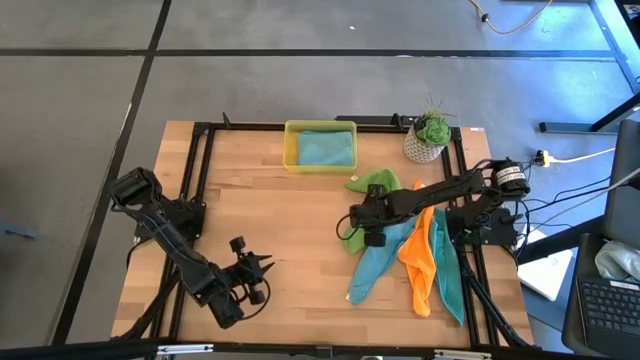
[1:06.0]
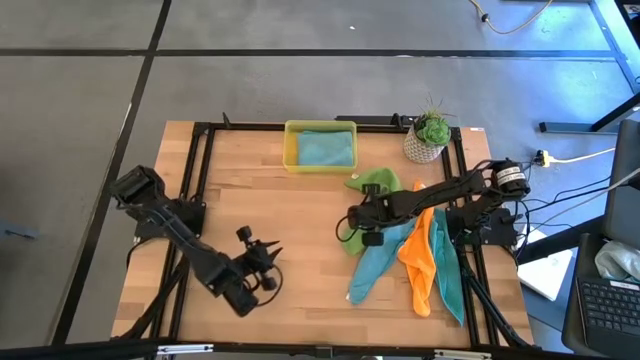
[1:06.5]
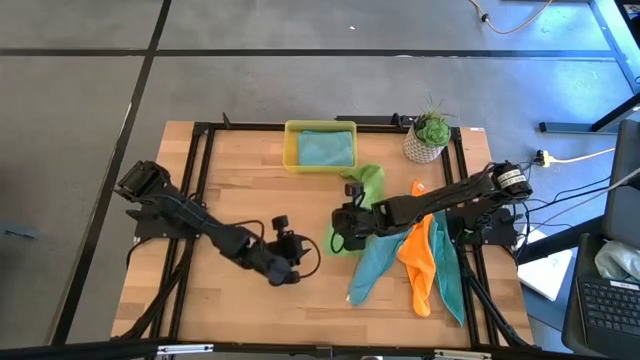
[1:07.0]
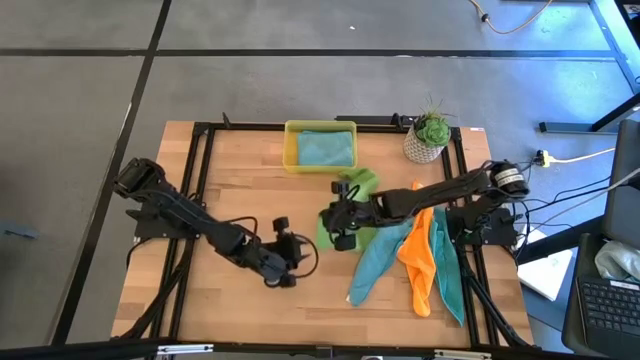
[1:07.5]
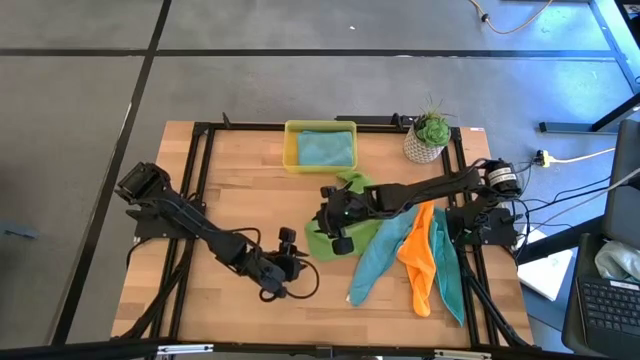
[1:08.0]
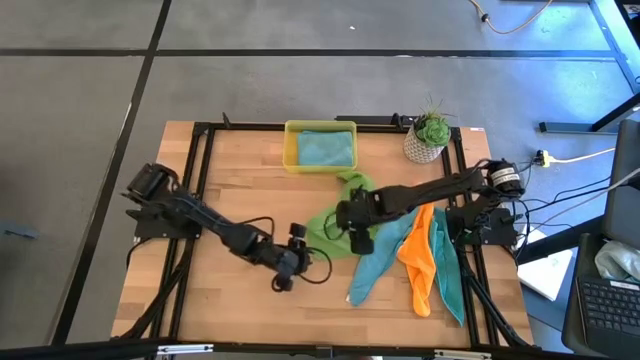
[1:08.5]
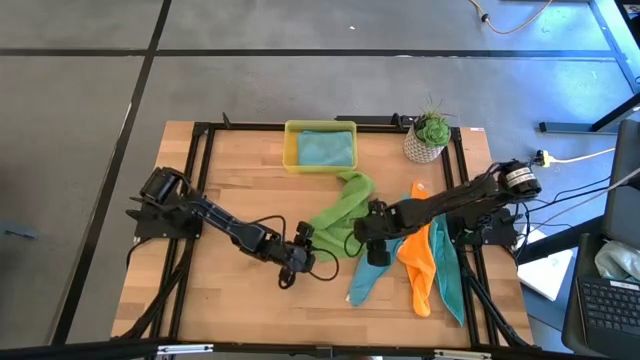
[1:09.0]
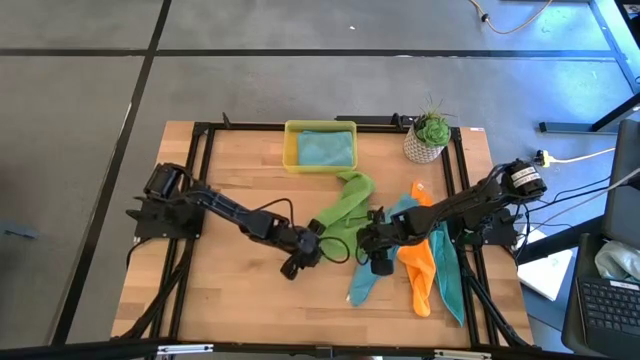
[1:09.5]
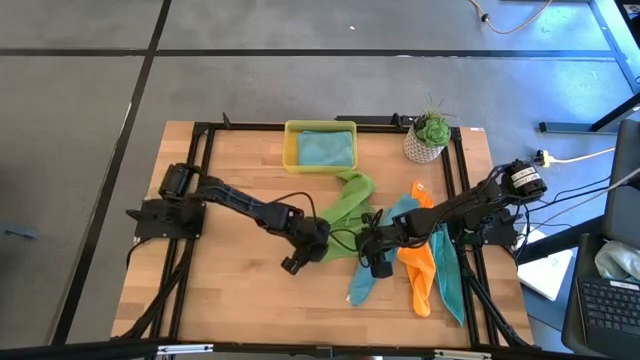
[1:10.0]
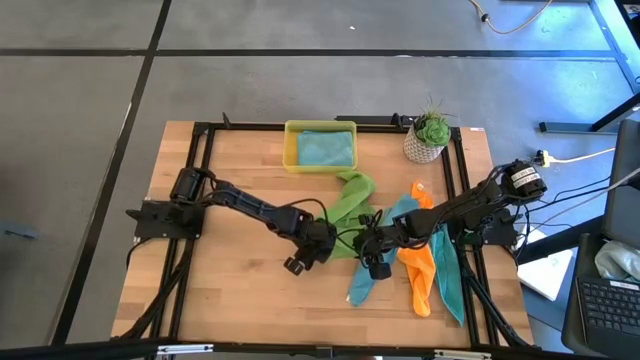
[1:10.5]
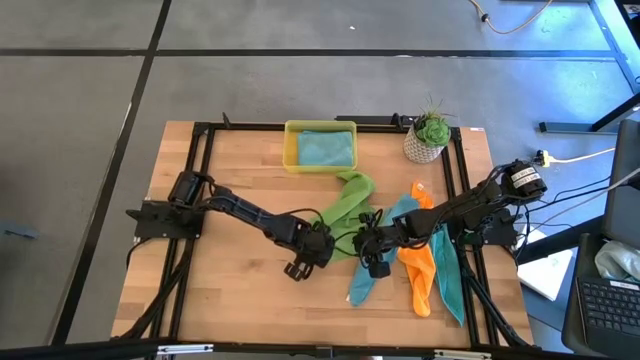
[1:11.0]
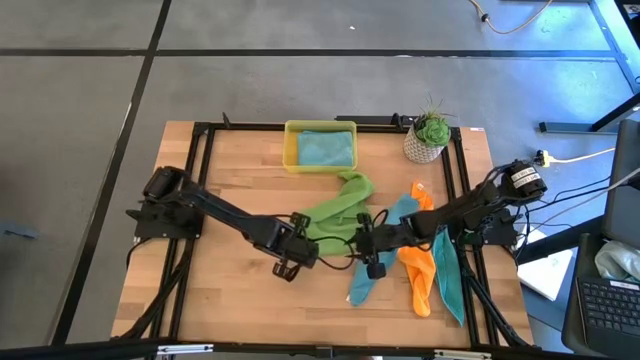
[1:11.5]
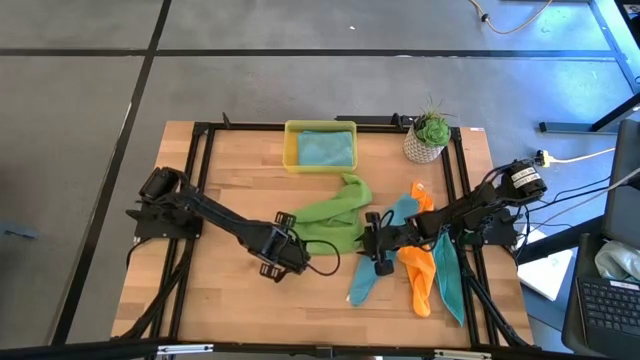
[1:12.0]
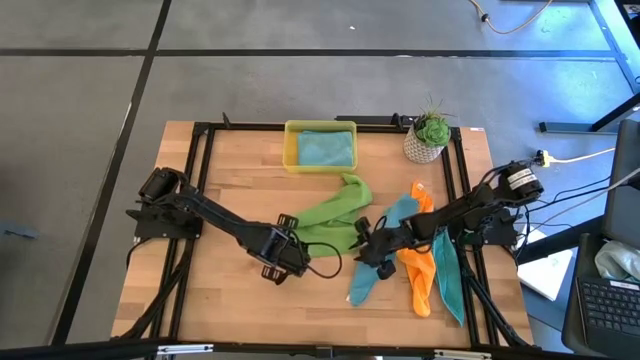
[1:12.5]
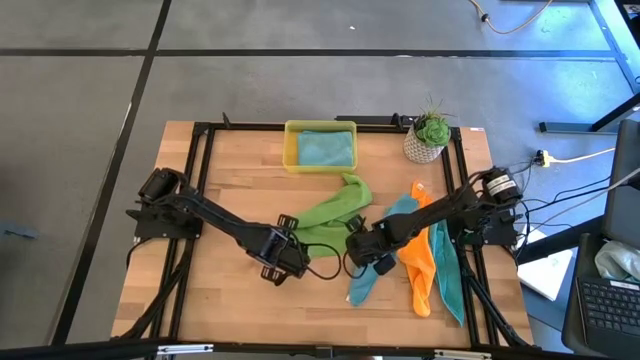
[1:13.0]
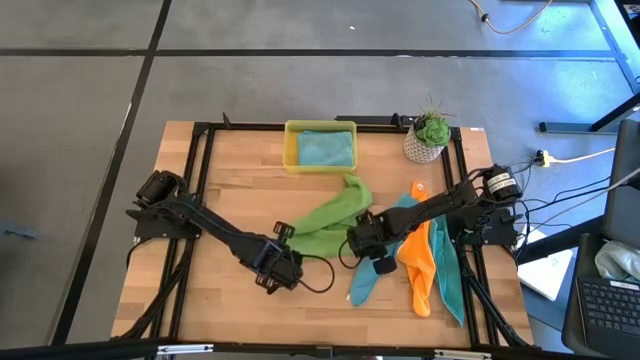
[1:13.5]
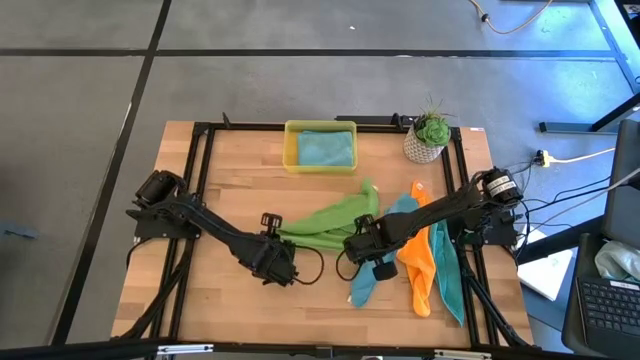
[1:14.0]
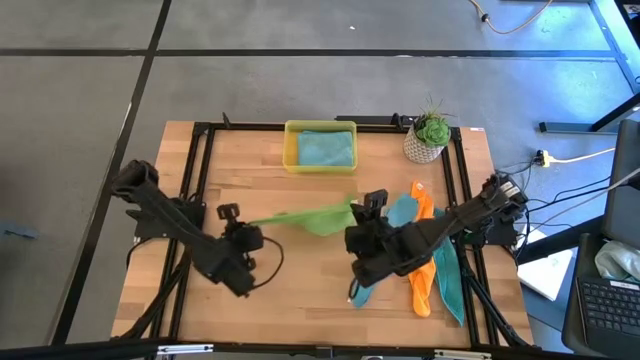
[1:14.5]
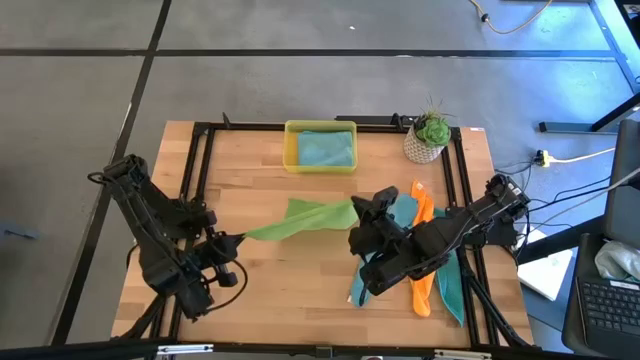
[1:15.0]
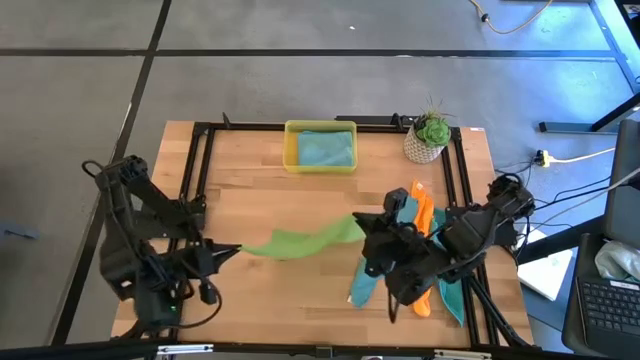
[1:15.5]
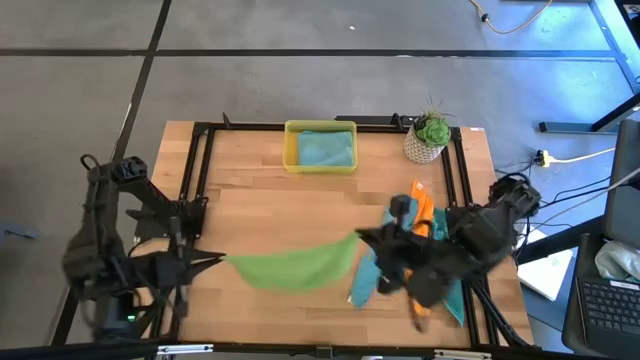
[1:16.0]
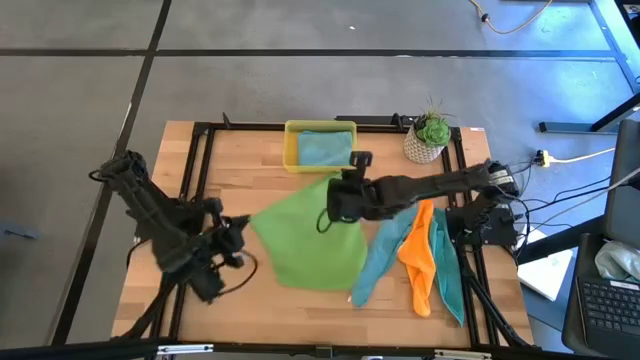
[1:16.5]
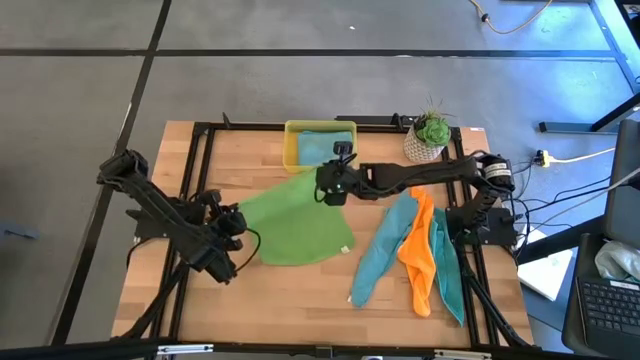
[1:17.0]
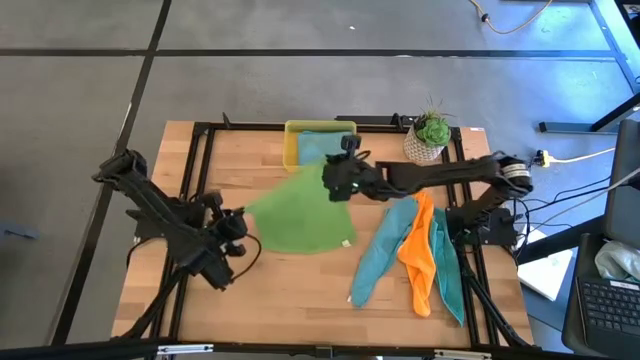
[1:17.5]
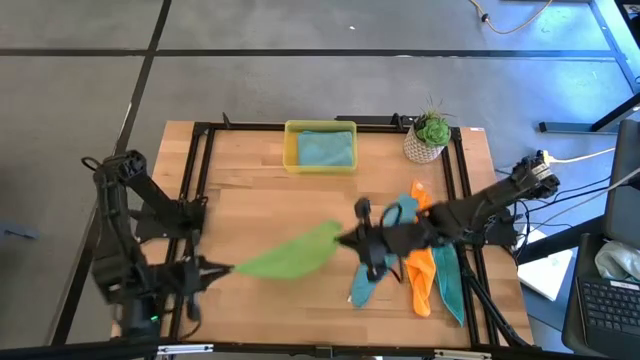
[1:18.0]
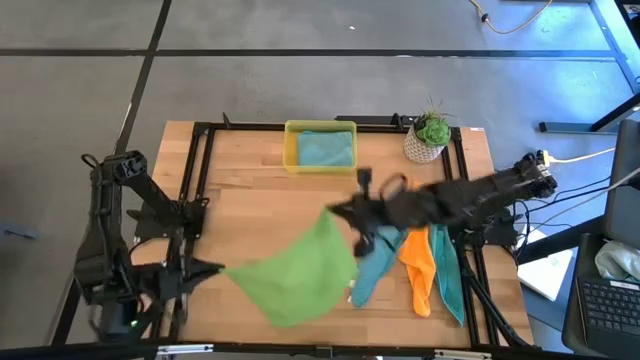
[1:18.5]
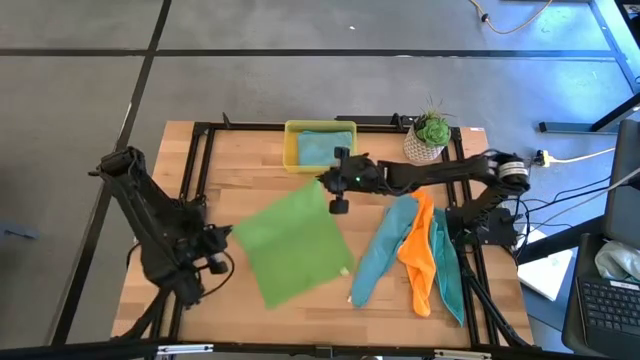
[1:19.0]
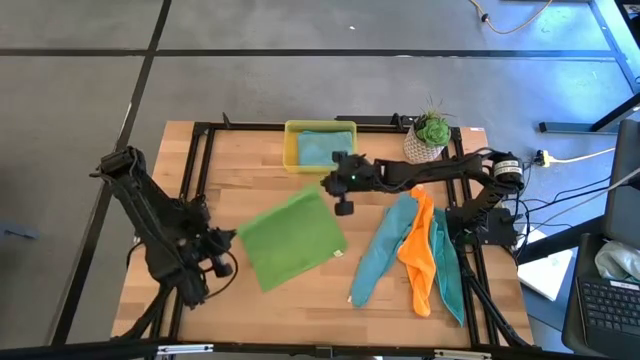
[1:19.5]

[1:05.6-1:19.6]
Task: Fold microfiber towels
Fold the green cloth

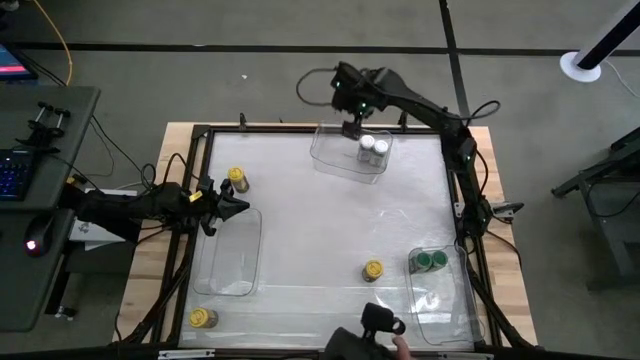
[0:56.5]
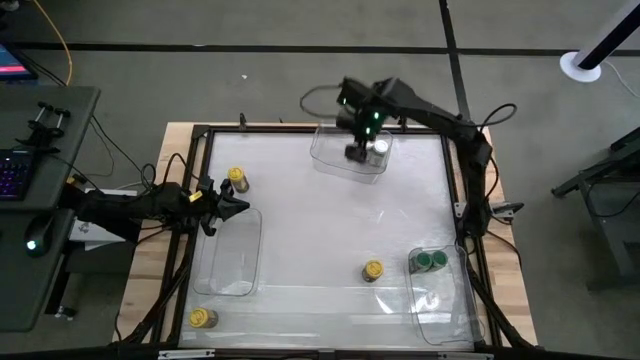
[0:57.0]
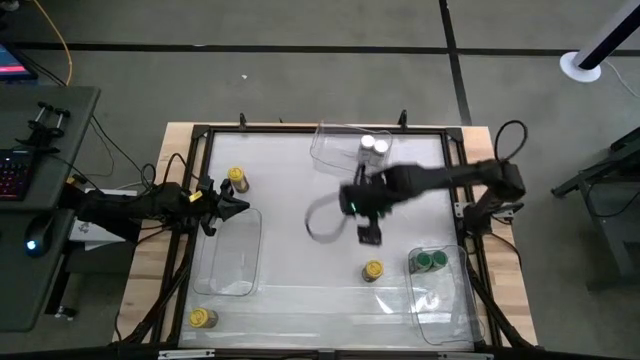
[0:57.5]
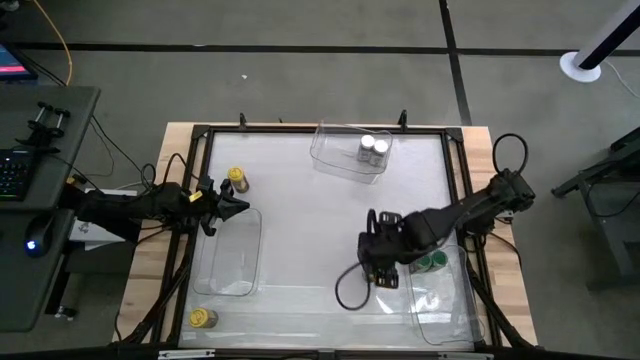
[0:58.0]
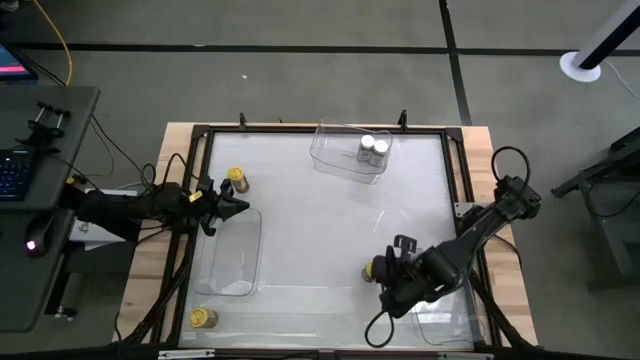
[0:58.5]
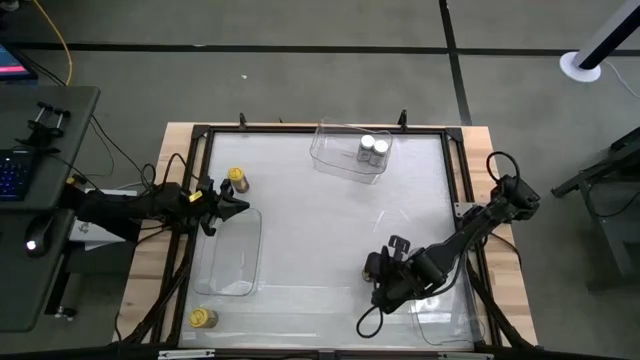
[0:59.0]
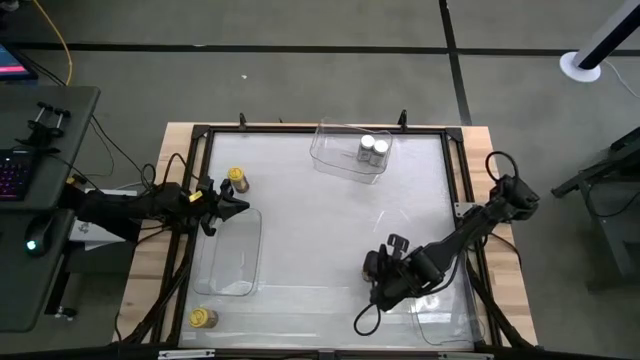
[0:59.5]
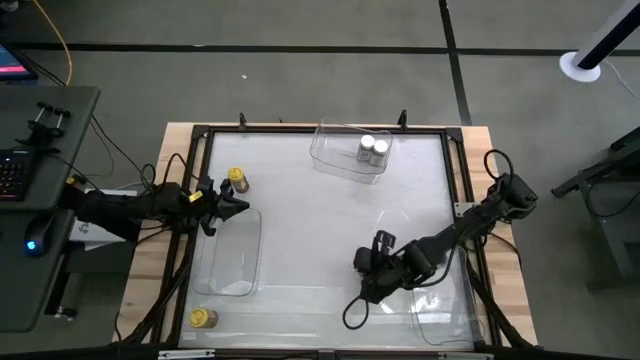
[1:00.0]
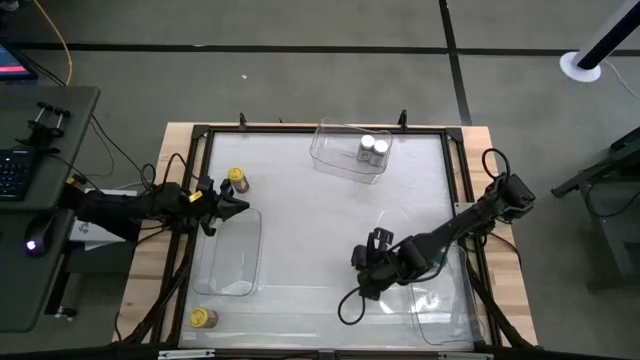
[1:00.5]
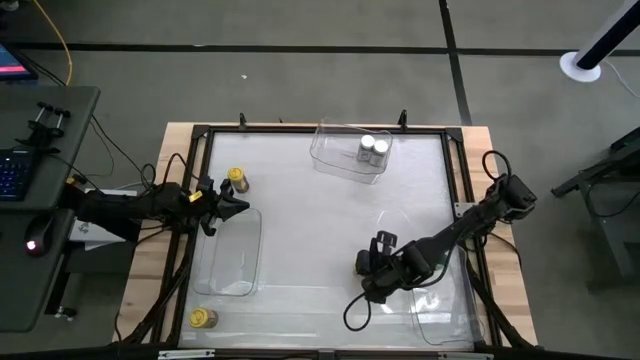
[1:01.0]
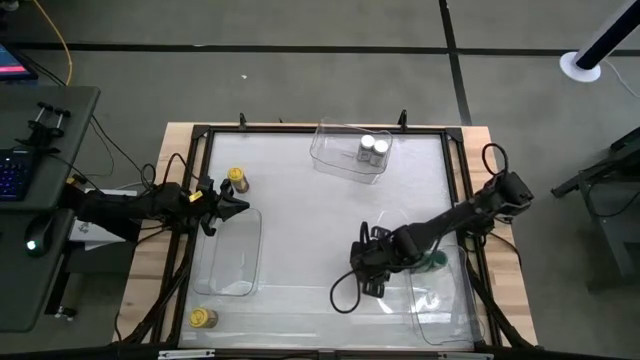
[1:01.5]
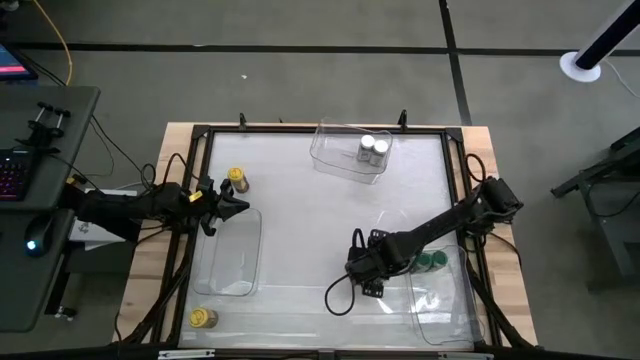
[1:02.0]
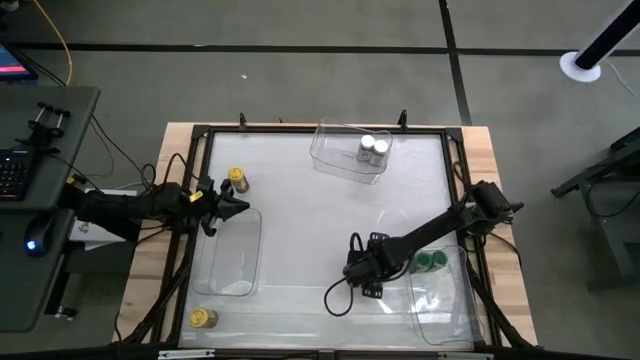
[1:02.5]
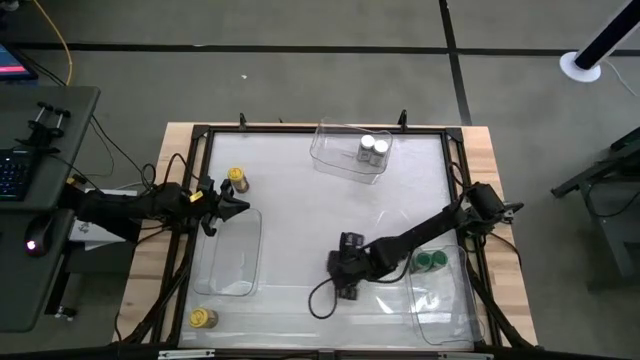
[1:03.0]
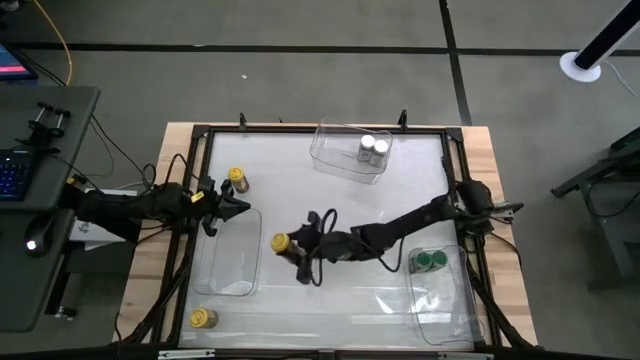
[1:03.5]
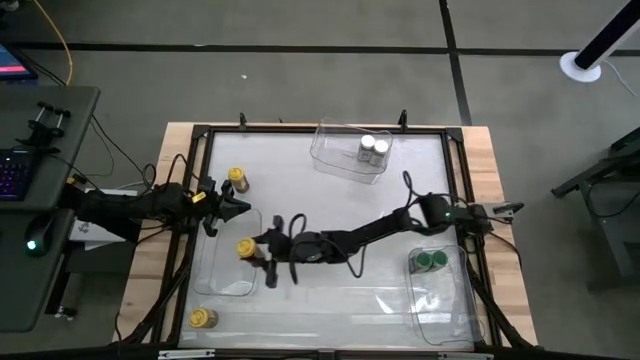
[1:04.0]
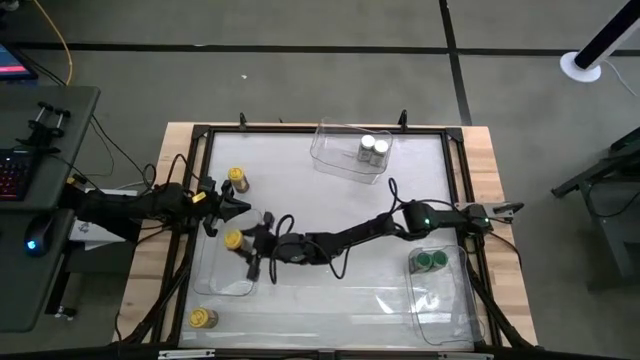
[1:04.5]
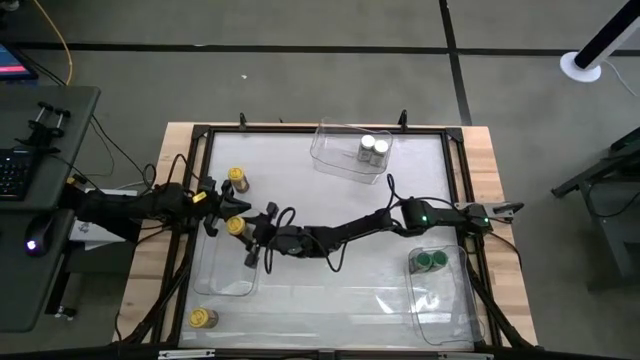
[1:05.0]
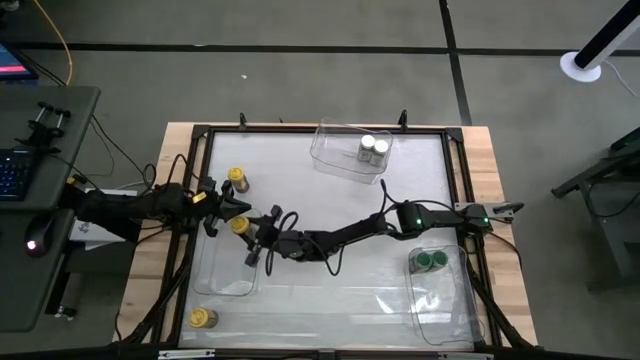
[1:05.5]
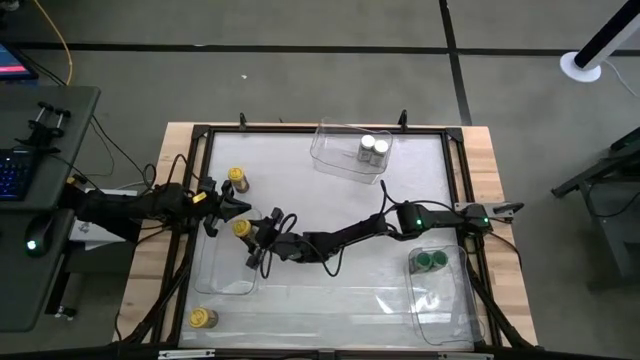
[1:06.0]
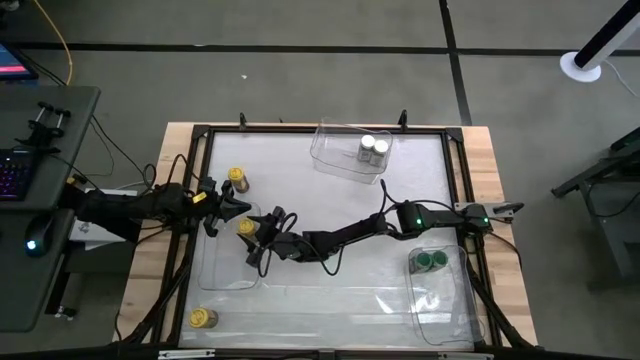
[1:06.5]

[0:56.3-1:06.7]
Task: Sort spices by type
Put the right yellow seasoning bottle into the left transparent bin
